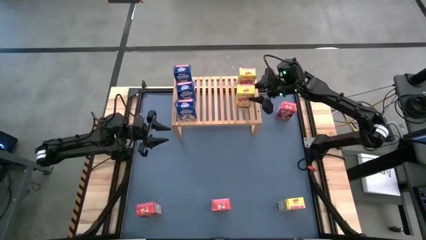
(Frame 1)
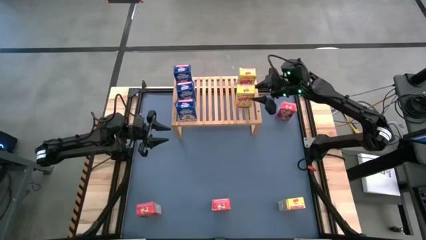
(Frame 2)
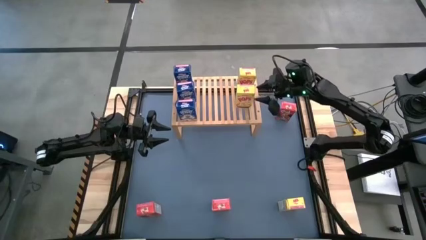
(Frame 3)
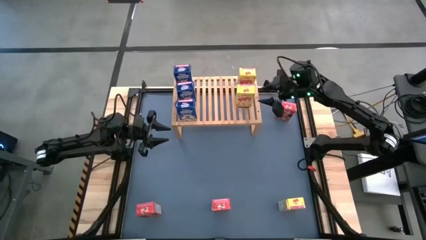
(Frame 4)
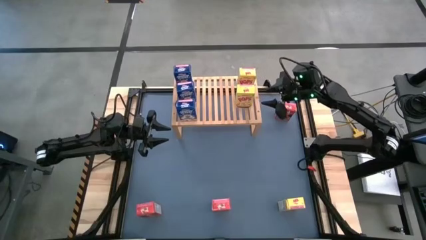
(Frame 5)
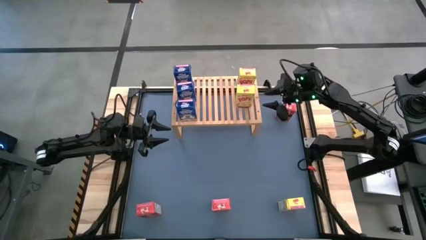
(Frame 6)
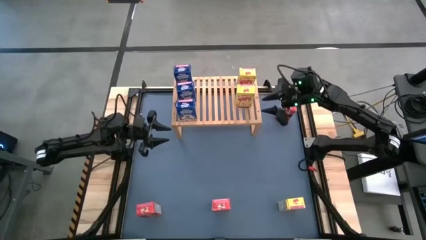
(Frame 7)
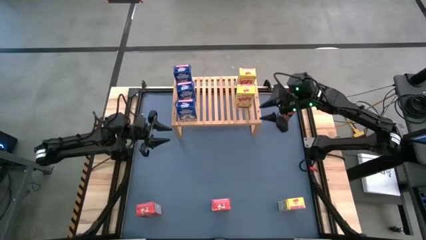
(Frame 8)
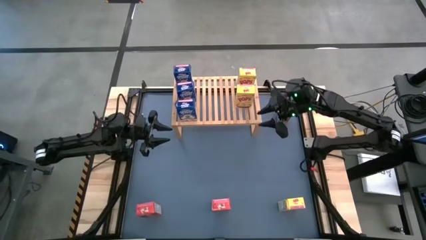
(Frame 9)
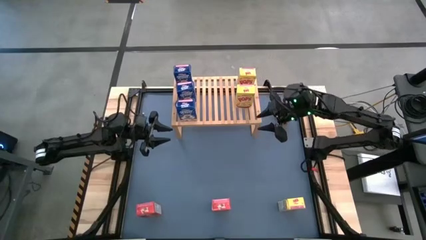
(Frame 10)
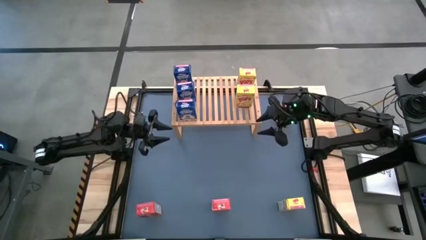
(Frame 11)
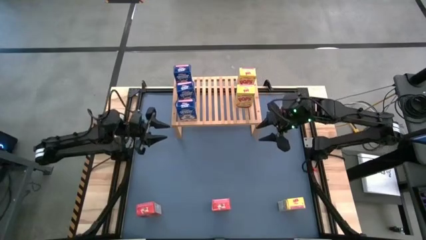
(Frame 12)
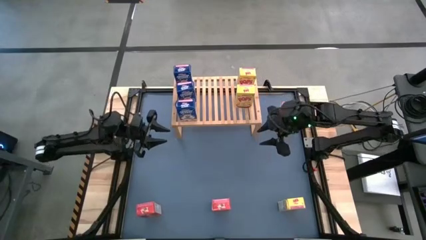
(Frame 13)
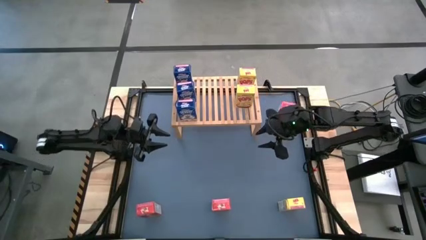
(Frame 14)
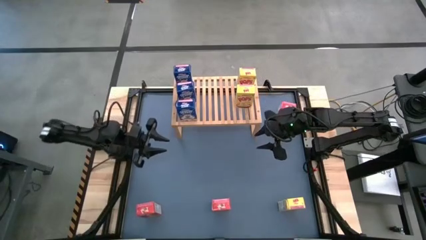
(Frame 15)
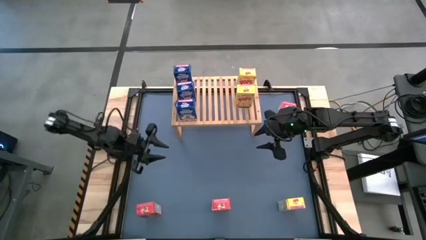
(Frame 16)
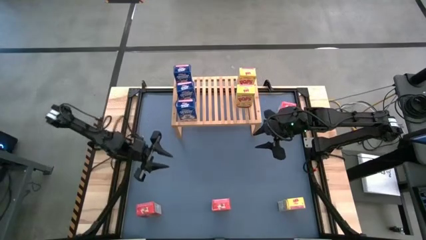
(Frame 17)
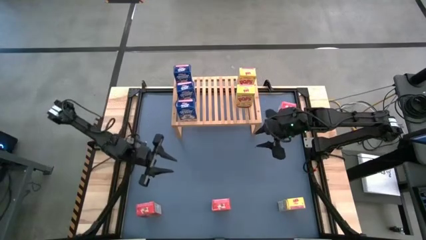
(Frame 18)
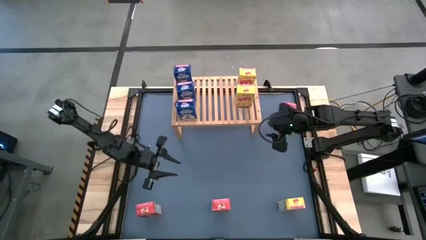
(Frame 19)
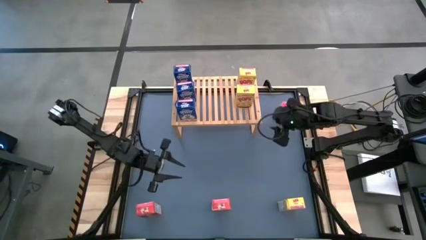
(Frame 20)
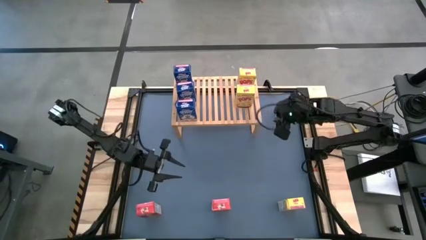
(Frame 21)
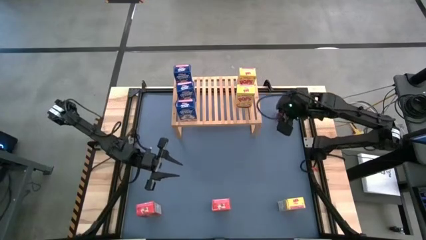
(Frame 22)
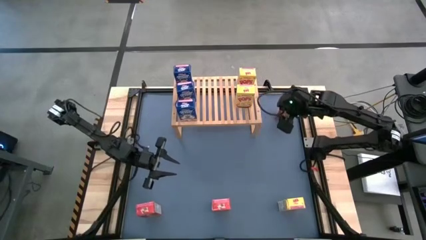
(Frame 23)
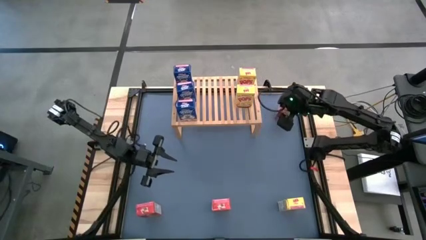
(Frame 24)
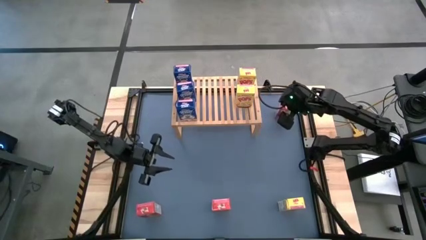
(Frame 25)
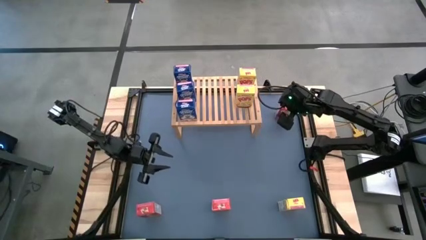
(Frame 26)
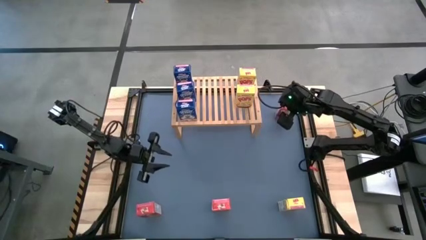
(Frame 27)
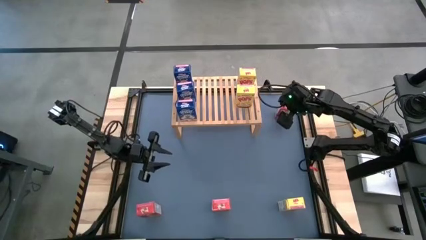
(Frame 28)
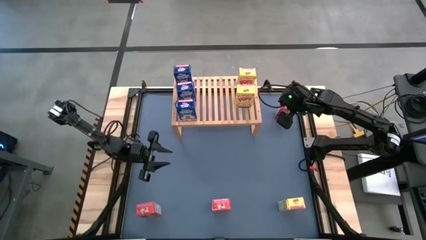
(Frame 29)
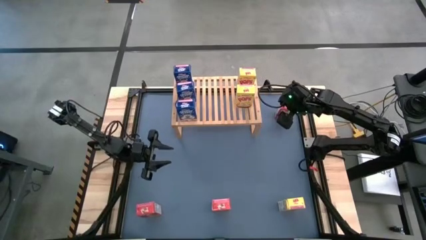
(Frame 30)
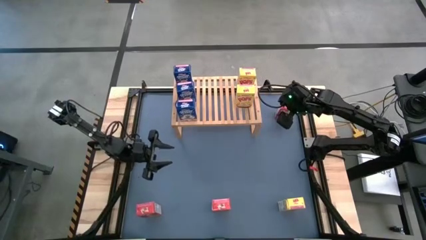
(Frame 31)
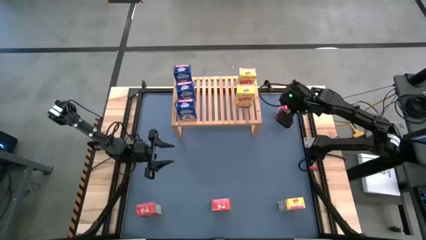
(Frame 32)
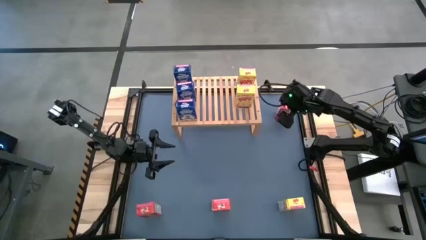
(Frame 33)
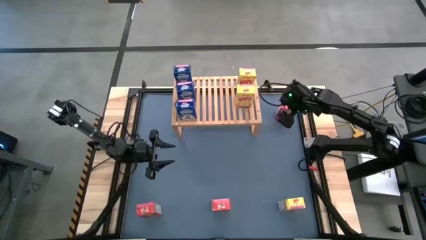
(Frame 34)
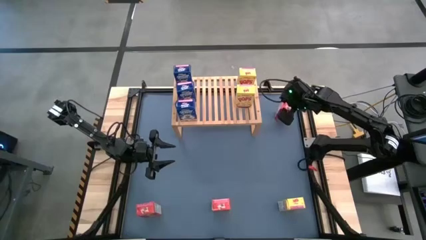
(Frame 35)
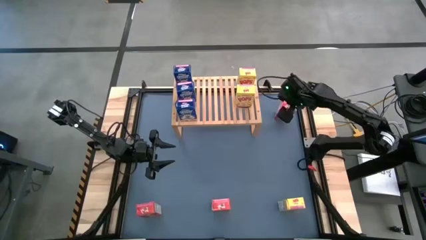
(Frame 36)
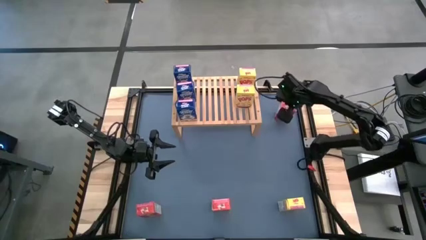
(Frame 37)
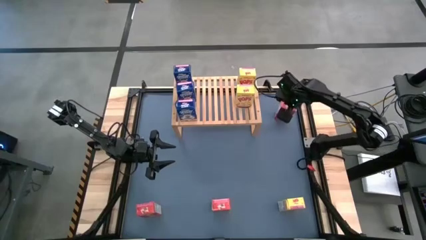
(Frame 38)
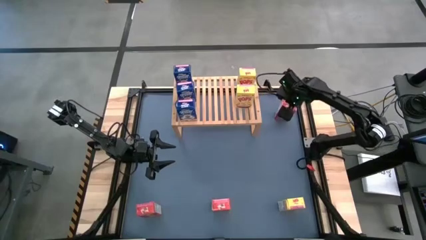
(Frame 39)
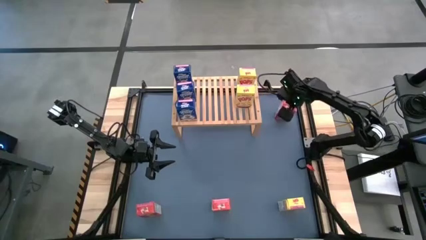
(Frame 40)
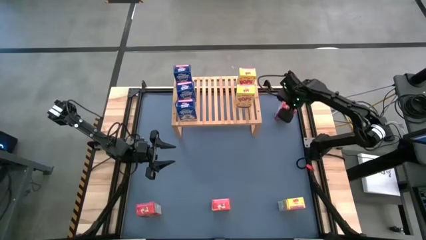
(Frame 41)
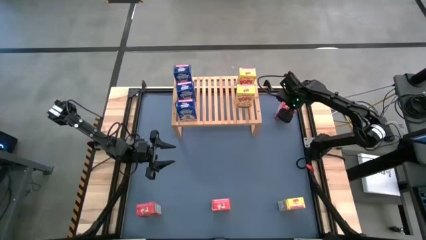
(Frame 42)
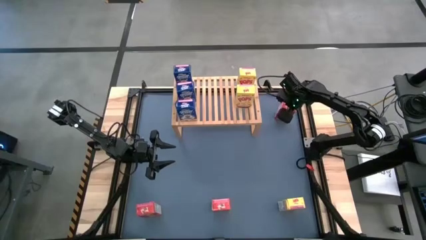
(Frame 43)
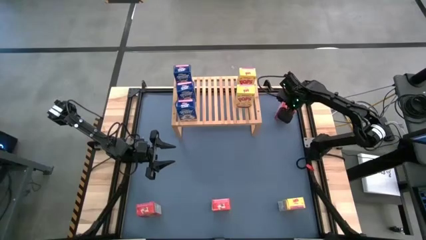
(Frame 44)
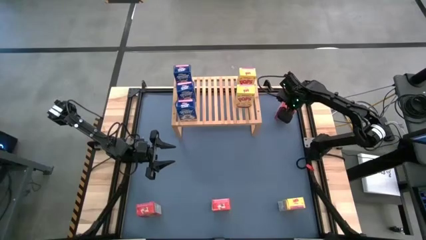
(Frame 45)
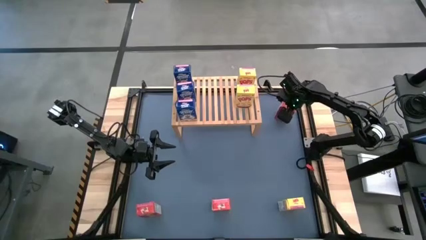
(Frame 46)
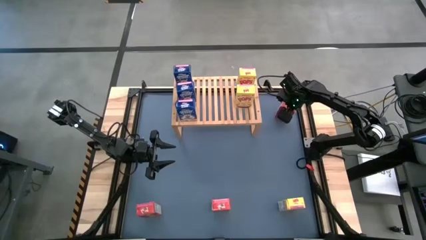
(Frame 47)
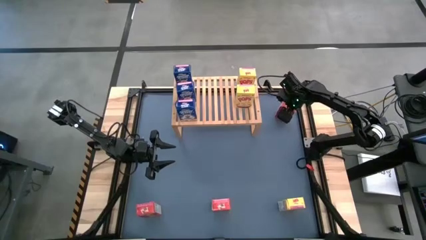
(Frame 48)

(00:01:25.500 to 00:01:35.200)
Task: Stack cereal on shelf
Put the top red cereal box on the shelf

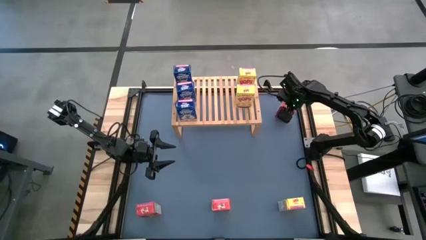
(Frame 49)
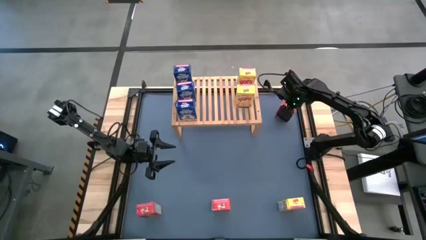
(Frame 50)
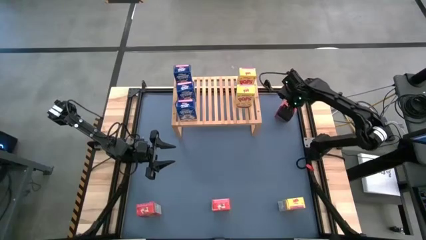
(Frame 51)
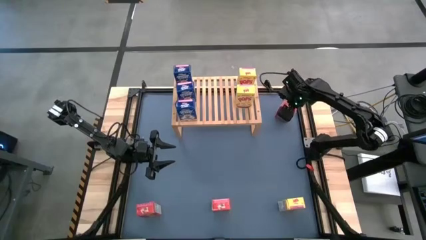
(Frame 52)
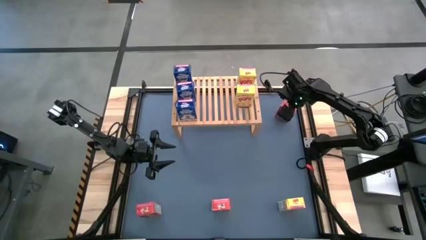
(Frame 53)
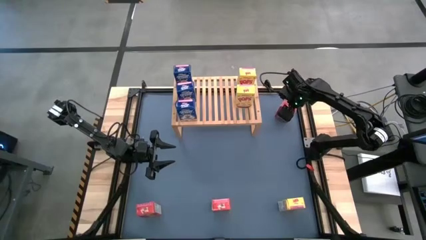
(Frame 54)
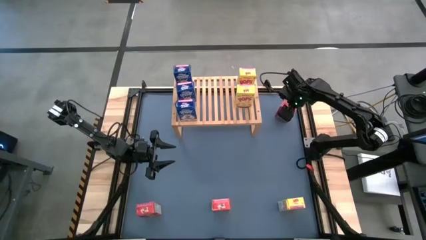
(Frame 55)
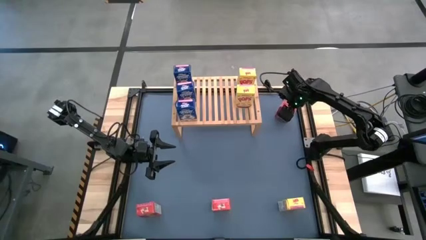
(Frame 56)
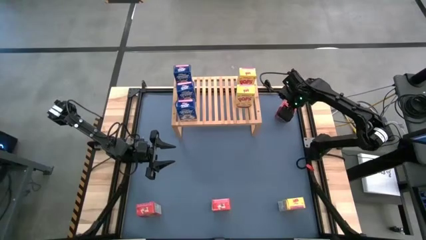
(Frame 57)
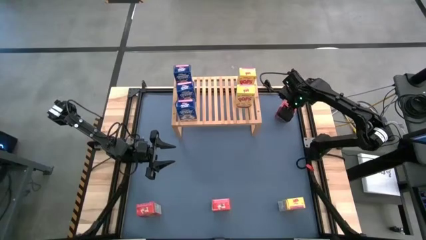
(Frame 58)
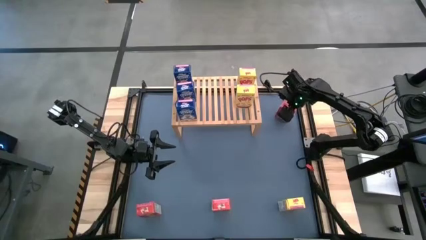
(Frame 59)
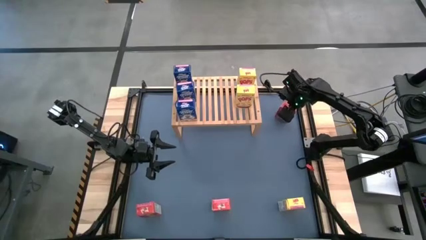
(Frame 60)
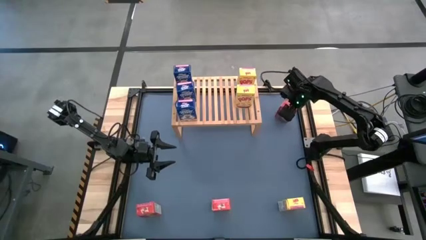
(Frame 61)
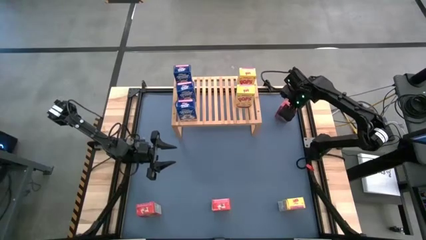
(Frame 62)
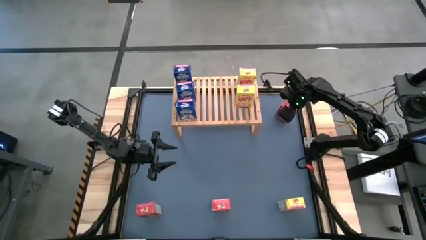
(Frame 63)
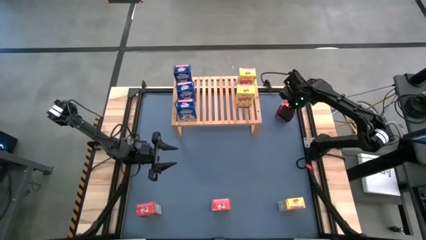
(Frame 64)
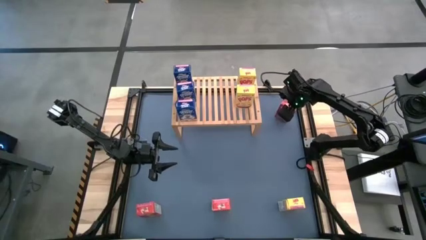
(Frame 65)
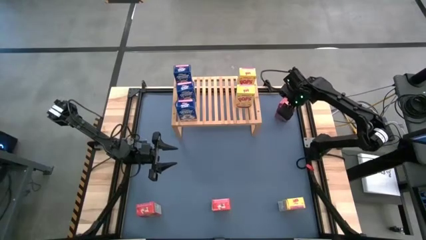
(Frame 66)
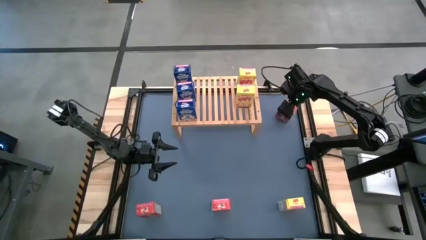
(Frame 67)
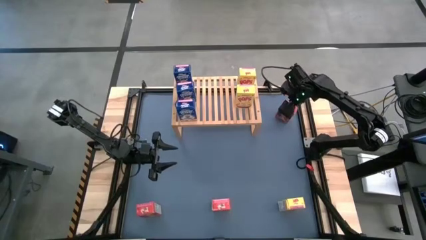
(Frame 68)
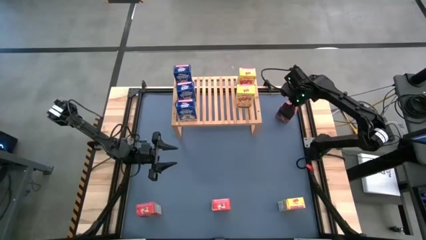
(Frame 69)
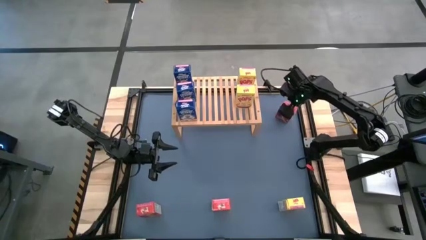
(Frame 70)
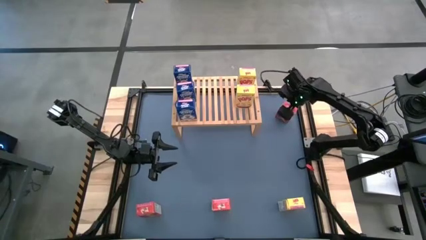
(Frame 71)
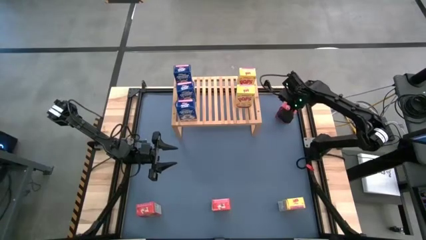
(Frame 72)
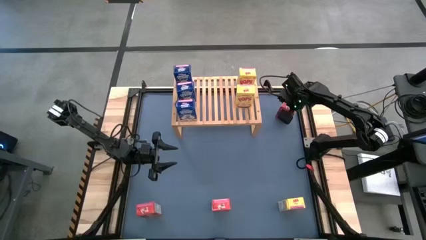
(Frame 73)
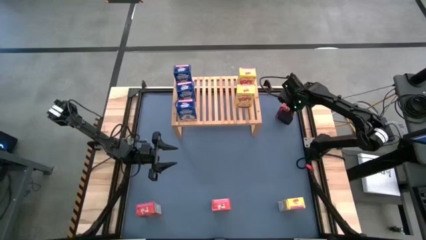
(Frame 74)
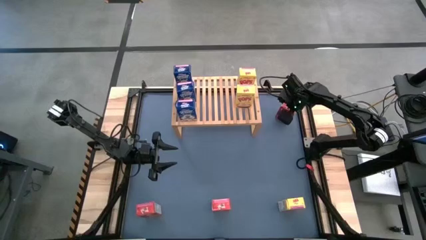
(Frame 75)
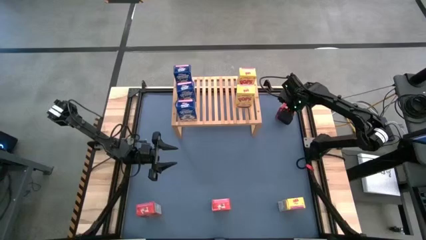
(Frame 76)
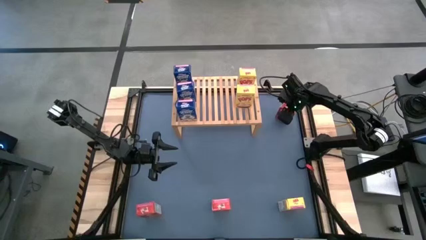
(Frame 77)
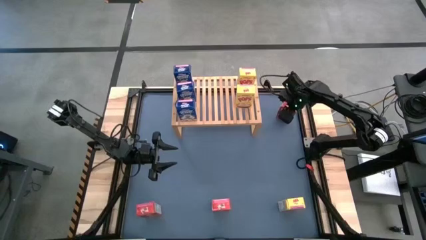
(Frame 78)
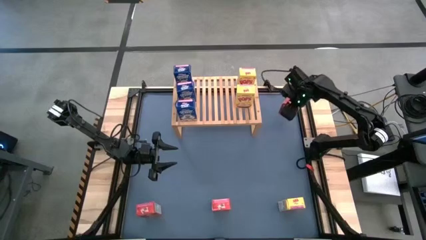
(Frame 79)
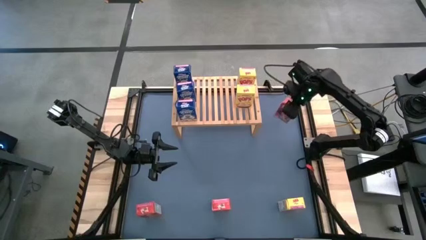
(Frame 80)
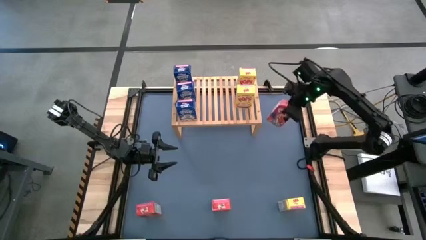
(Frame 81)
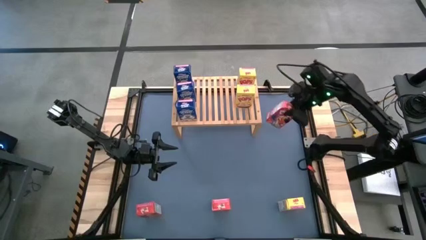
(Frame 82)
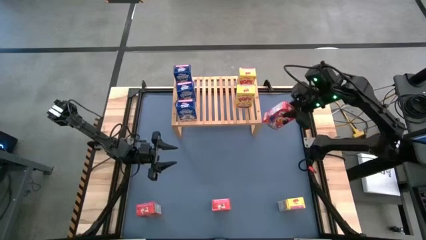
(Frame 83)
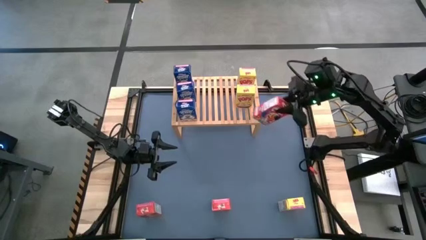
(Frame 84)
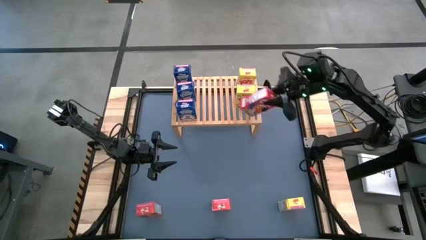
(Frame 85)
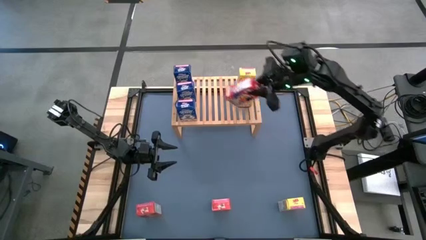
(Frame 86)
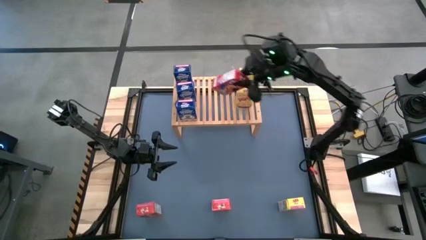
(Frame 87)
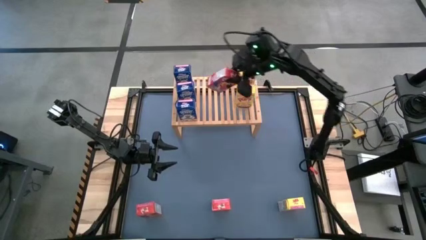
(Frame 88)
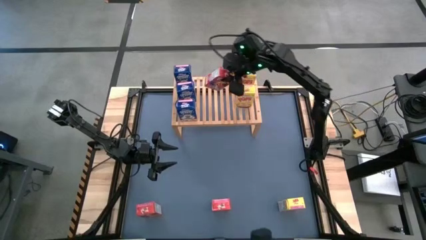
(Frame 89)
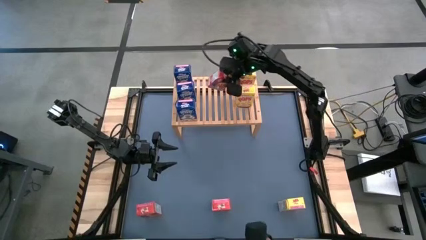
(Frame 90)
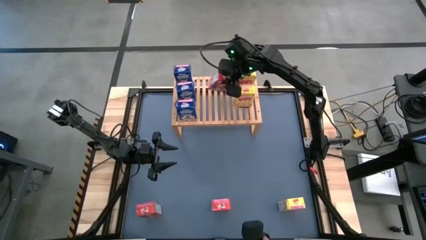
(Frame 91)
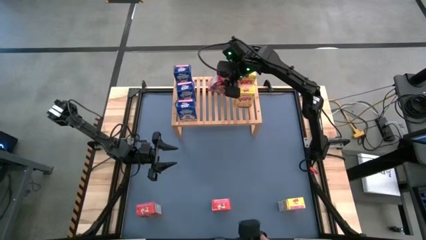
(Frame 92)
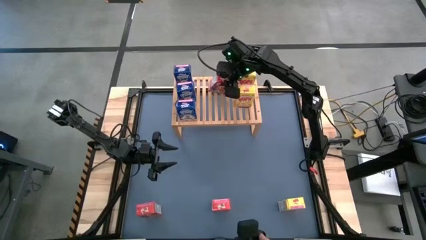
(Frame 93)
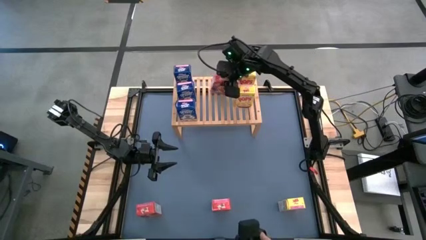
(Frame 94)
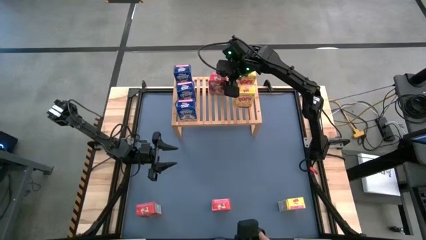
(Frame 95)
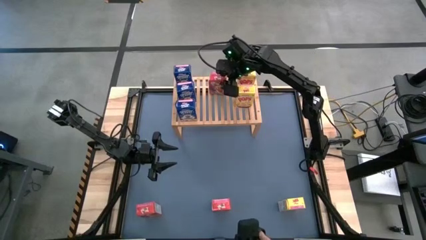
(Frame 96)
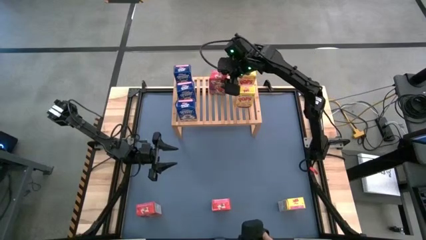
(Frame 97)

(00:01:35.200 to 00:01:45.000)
Put the top red cereal box on the shelf
